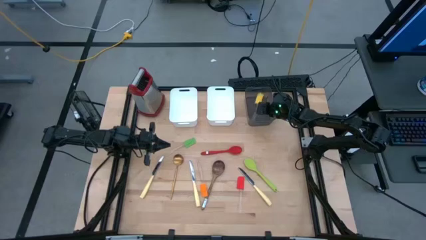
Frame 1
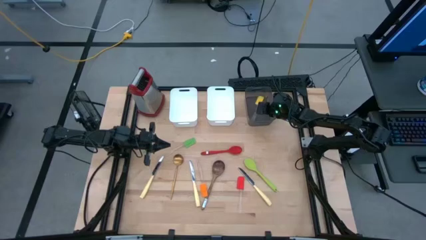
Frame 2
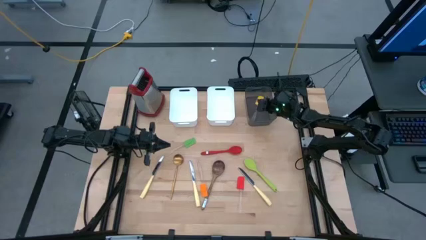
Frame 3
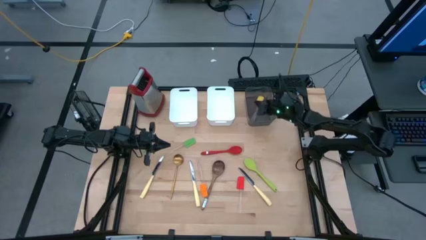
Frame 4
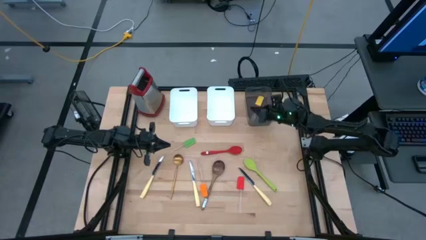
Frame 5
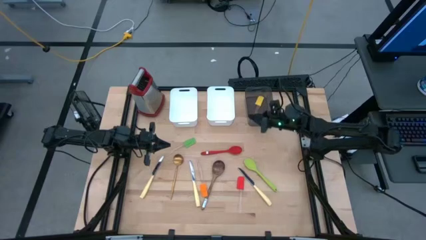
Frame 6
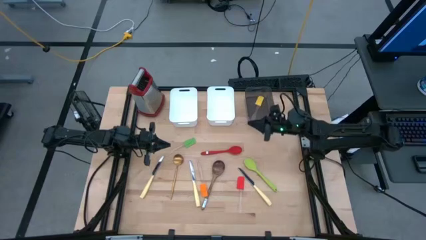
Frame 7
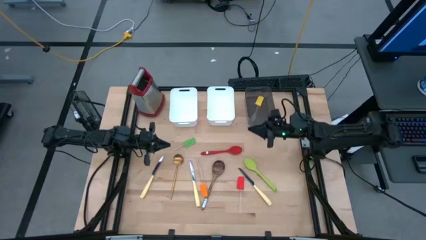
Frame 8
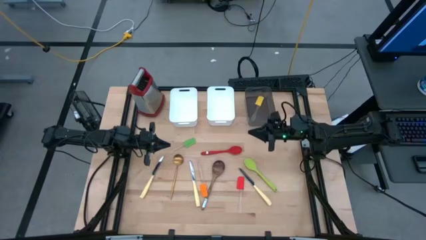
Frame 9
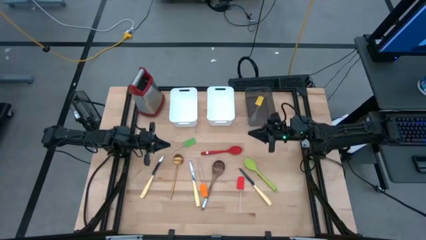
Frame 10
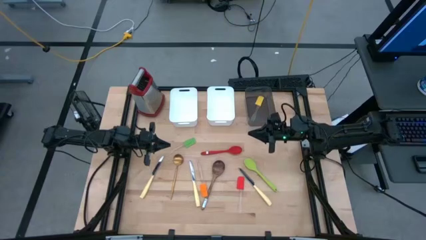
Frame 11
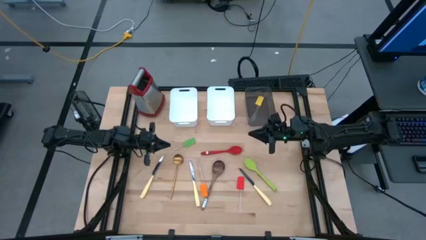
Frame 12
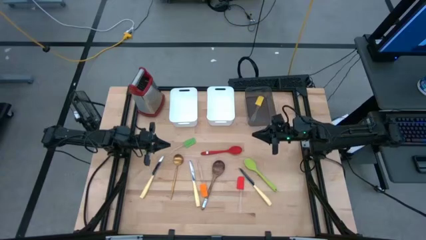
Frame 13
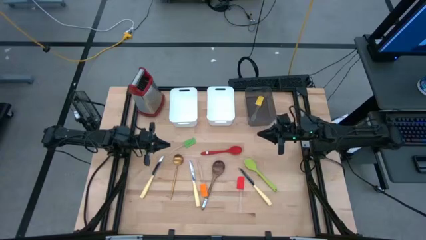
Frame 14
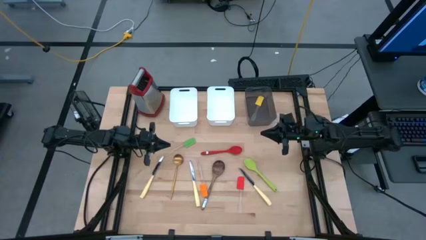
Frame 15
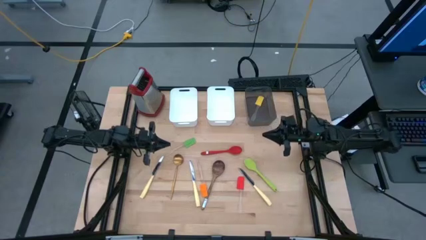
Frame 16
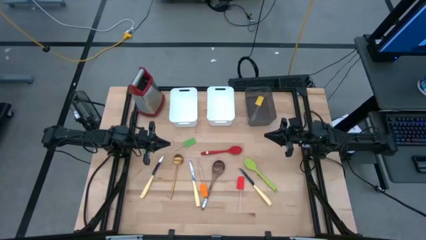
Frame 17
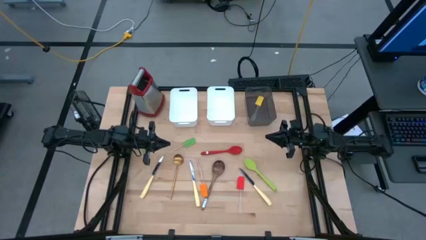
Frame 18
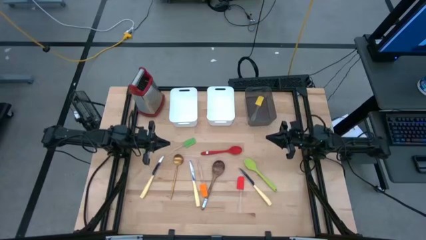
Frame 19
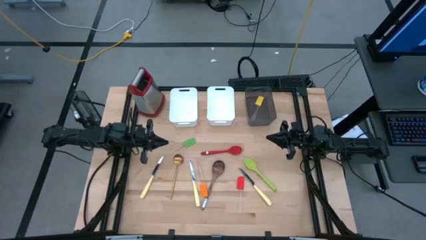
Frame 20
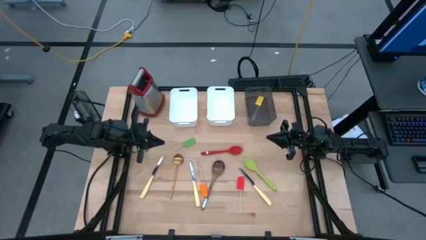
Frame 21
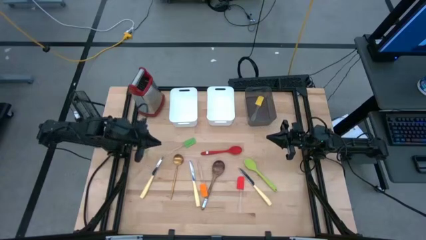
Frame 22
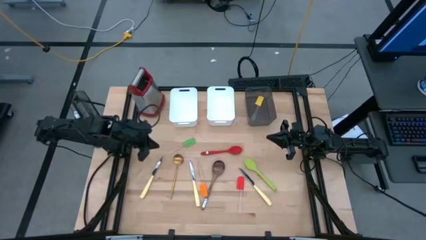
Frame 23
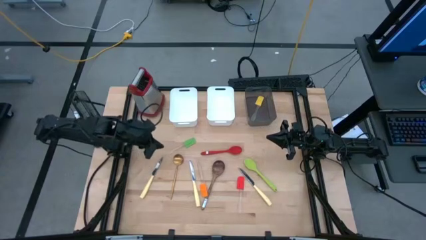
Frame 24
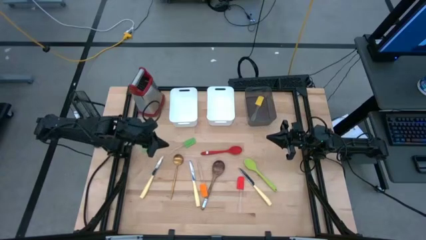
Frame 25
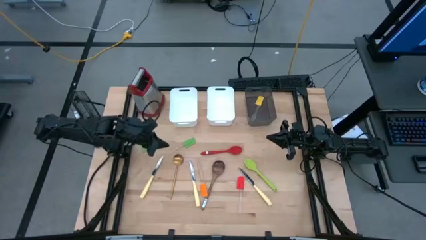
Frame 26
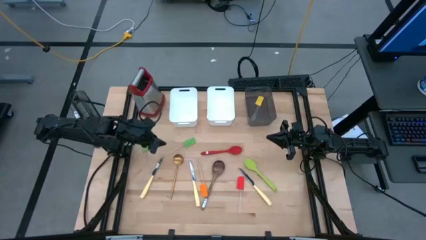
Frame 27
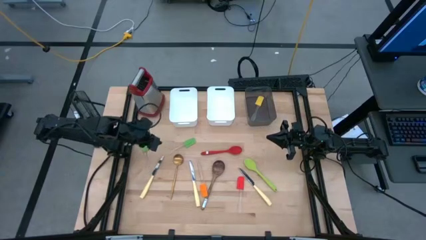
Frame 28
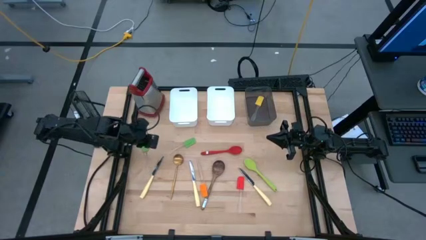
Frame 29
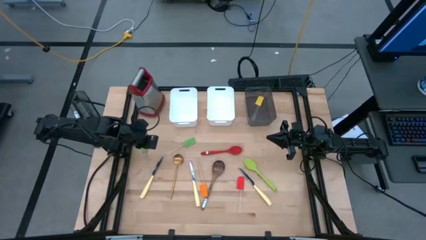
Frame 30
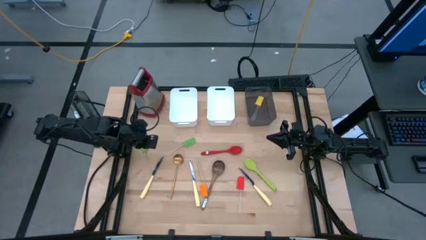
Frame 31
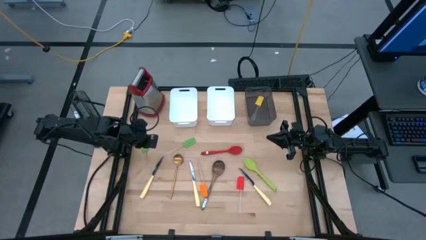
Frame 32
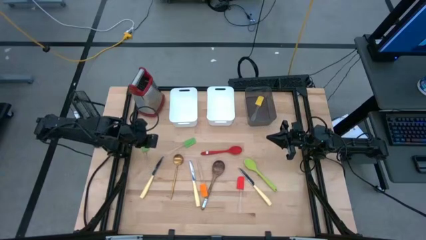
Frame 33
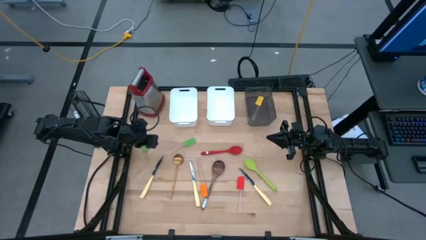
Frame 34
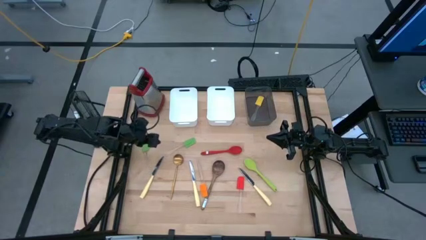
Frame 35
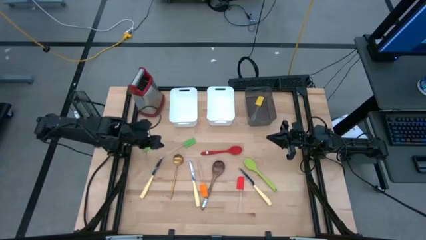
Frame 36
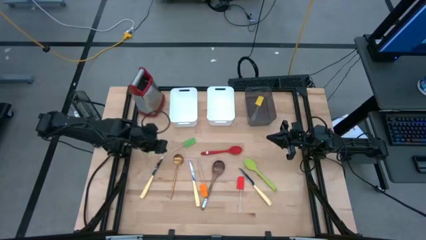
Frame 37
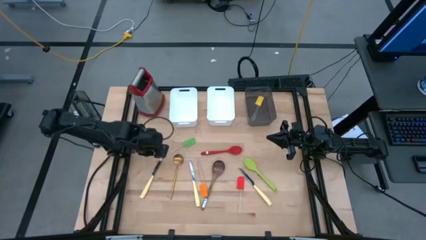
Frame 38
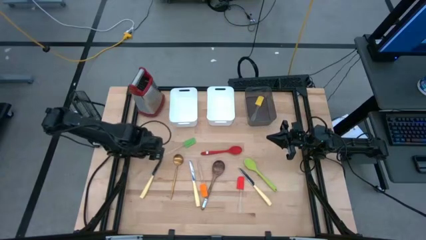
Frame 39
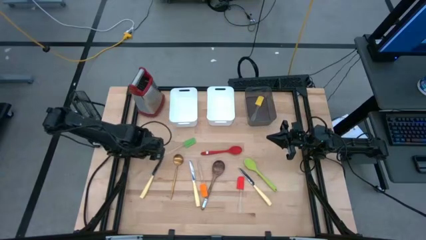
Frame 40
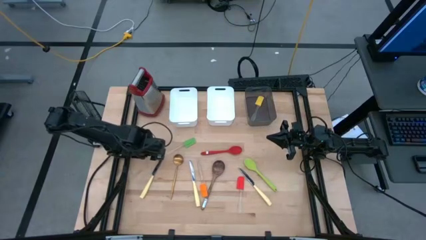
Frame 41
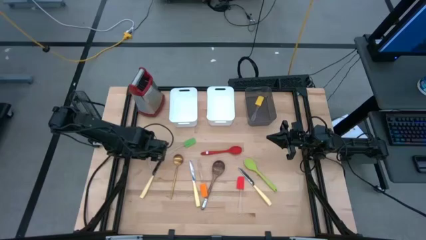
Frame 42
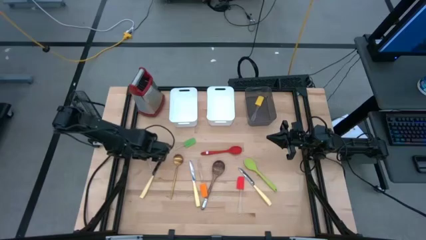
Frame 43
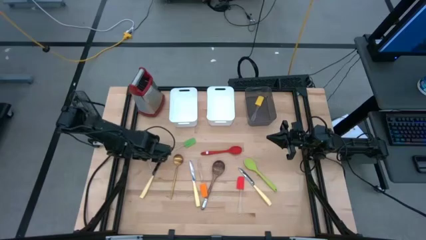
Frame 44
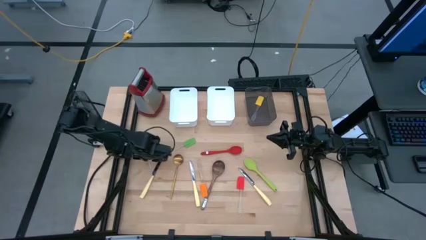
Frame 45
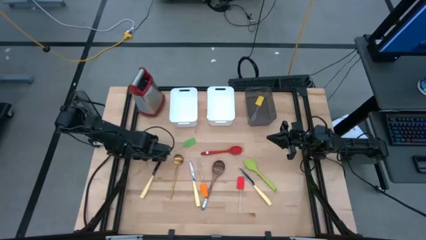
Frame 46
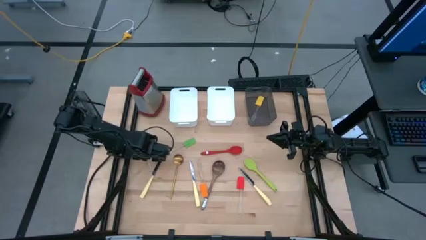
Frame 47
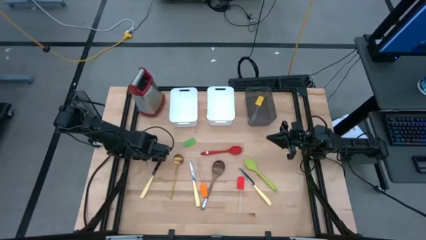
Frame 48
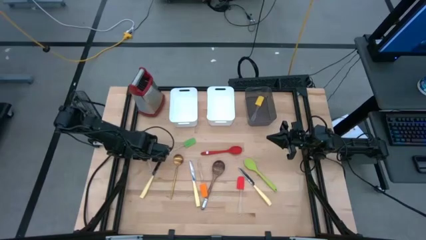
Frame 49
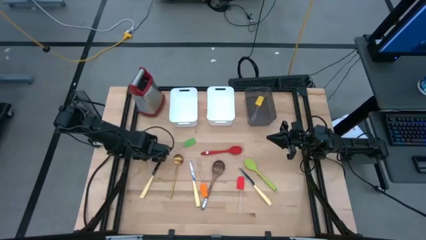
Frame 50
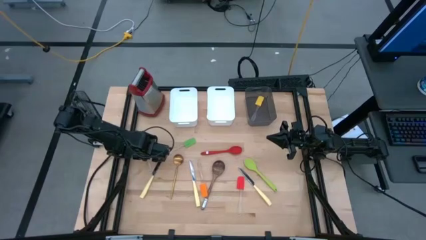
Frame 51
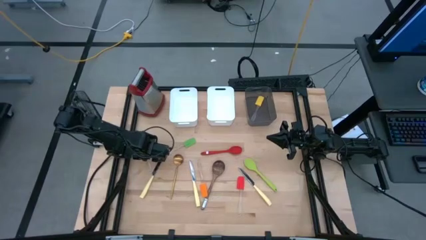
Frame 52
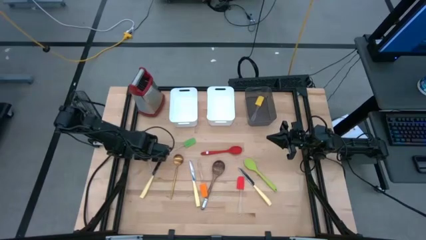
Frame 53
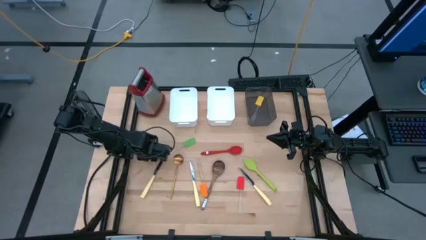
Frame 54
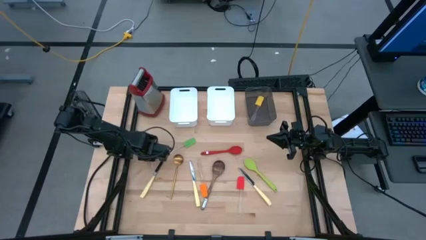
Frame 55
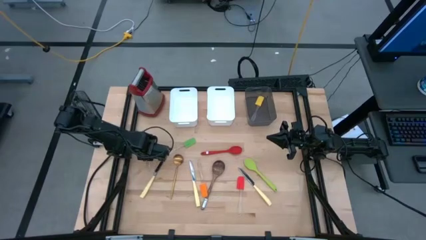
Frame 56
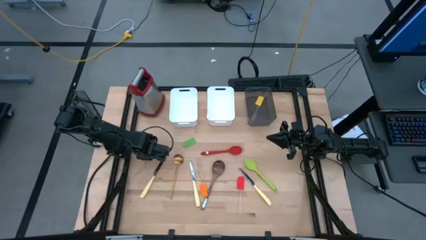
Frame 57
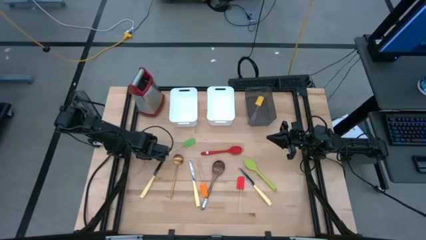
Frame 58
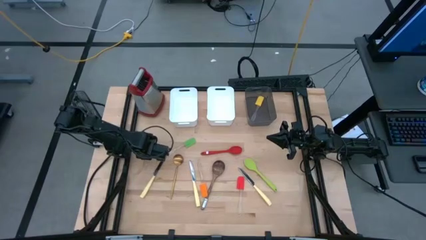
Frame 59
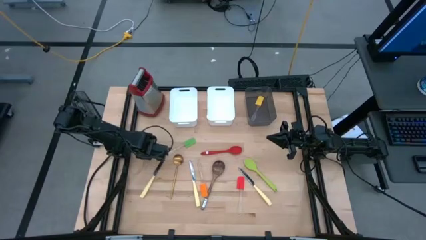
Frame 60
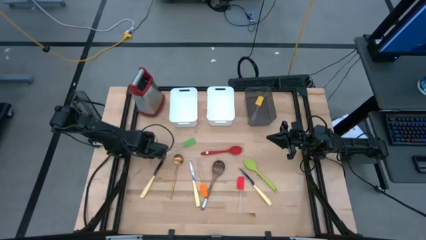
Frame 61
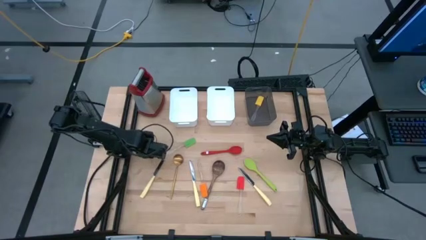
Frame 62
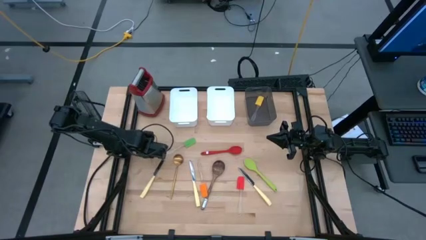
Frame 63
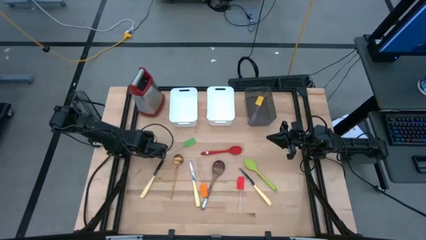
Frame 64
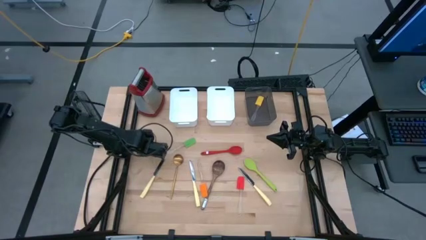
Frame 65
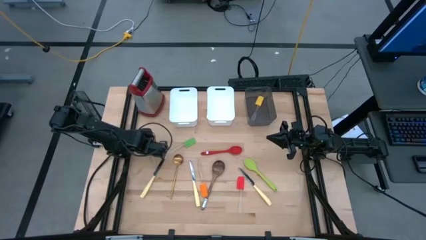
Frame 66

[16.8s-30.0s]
Task: Pick & Place Kitchen Items
Put the green silicone spatula into the black bin
